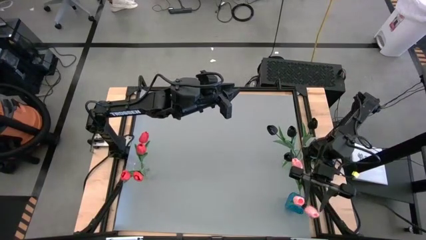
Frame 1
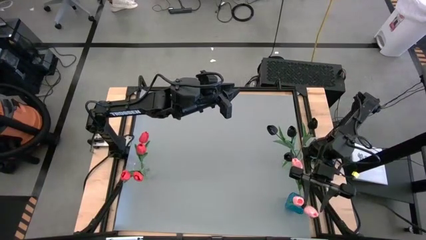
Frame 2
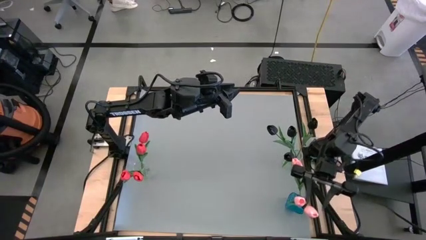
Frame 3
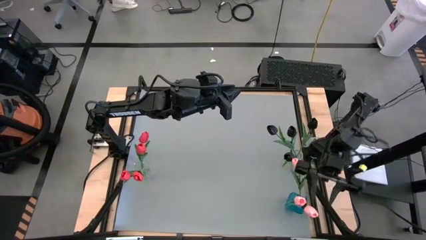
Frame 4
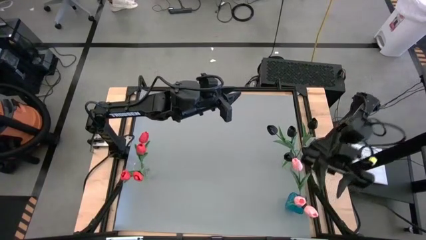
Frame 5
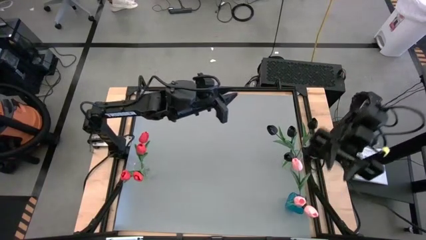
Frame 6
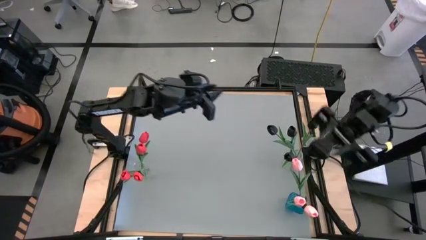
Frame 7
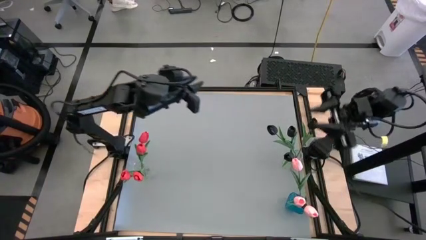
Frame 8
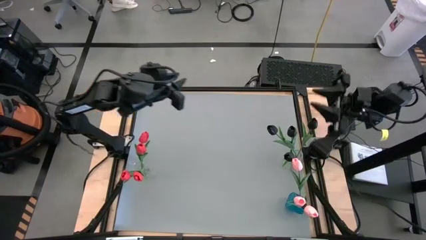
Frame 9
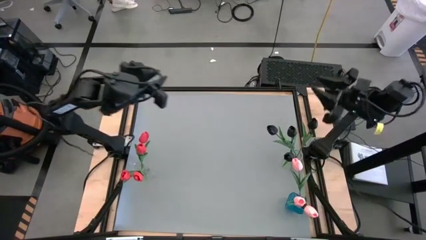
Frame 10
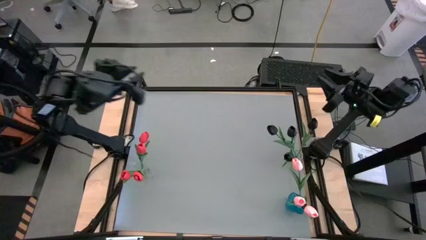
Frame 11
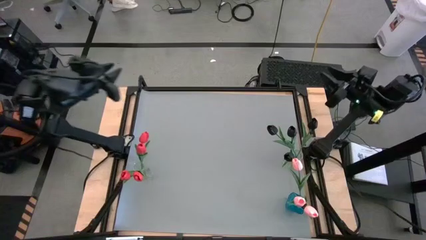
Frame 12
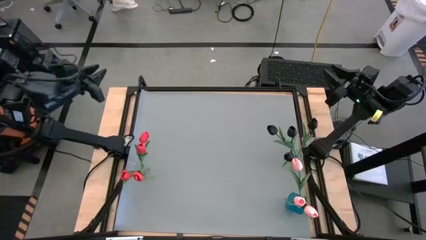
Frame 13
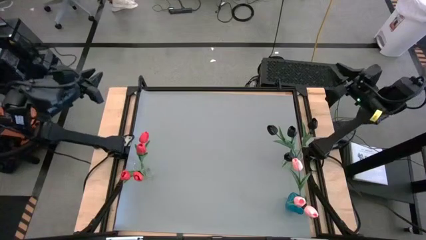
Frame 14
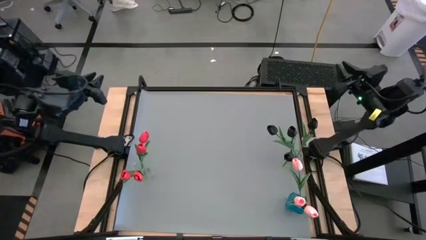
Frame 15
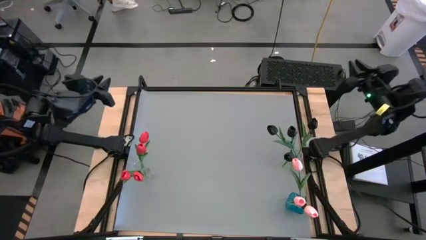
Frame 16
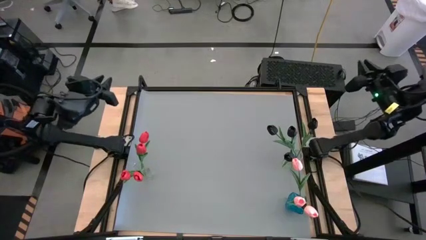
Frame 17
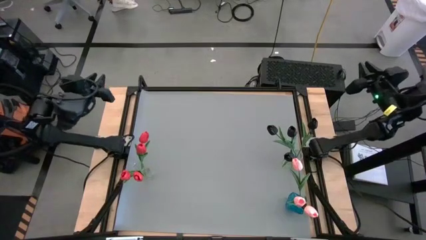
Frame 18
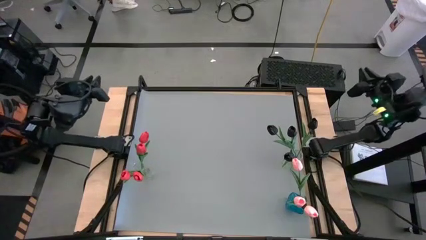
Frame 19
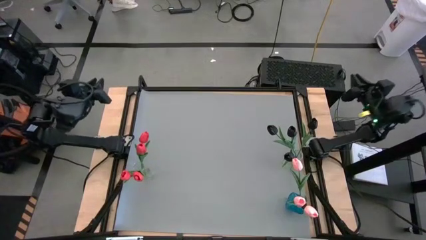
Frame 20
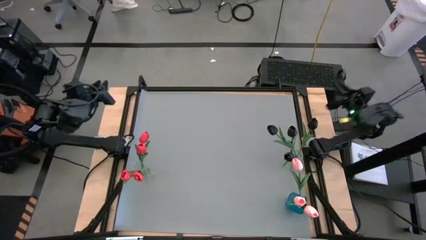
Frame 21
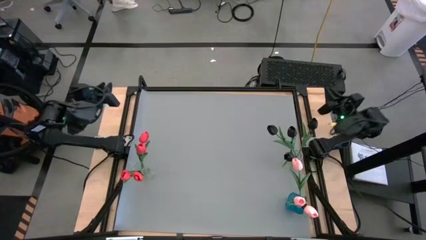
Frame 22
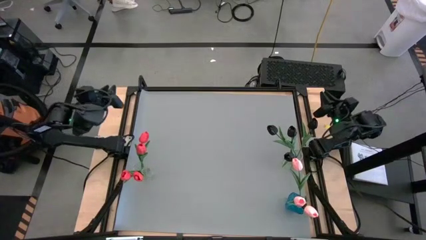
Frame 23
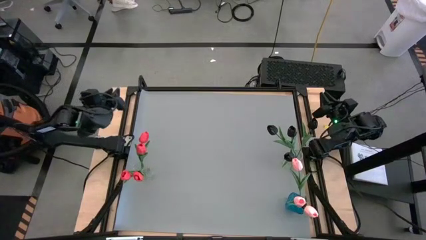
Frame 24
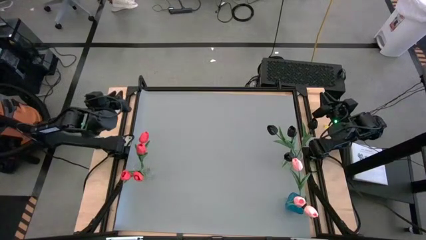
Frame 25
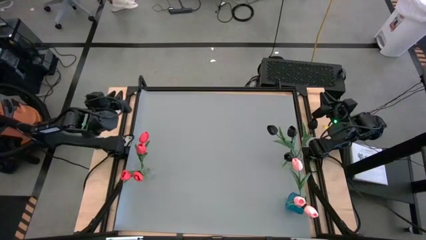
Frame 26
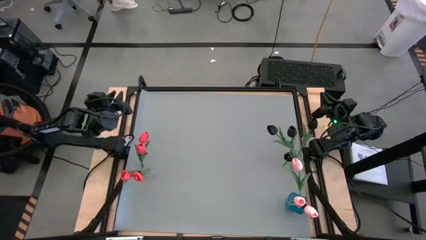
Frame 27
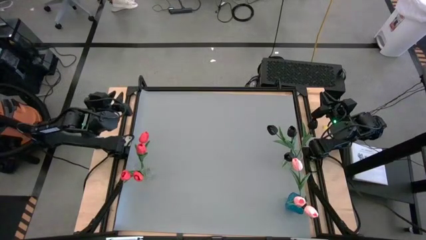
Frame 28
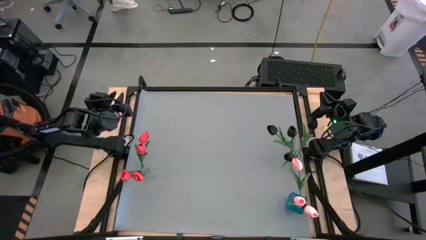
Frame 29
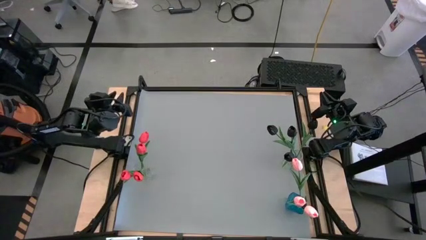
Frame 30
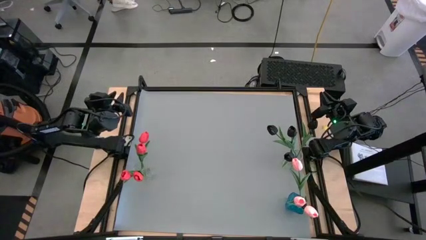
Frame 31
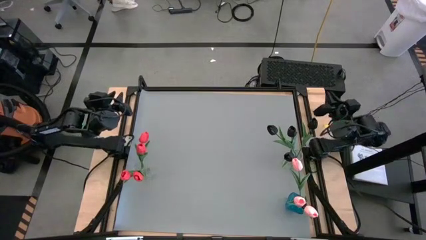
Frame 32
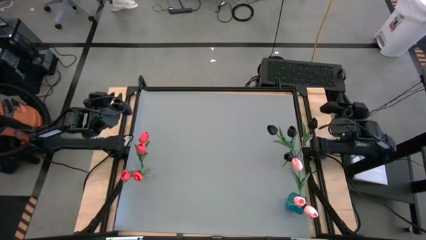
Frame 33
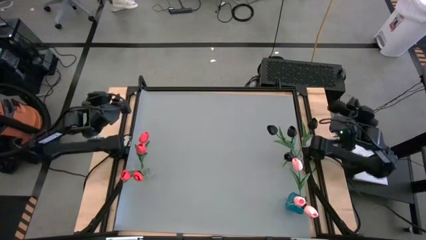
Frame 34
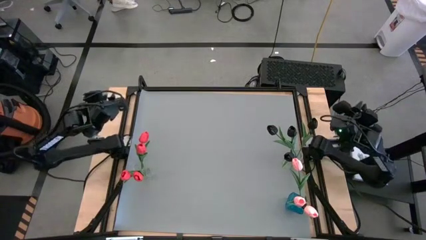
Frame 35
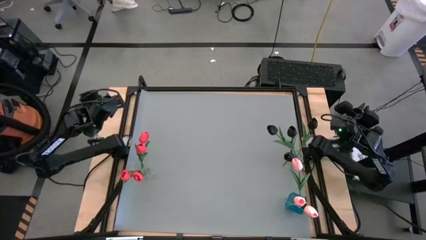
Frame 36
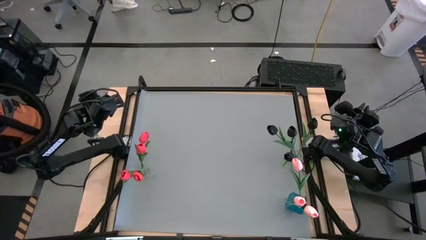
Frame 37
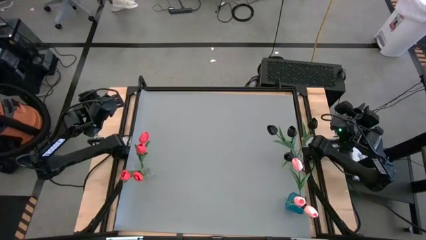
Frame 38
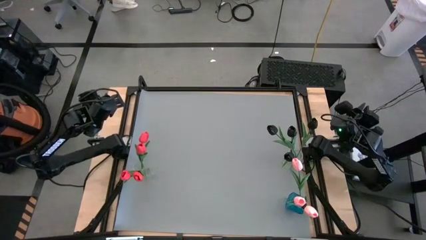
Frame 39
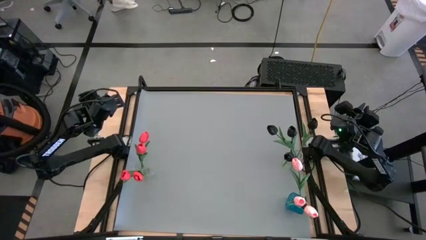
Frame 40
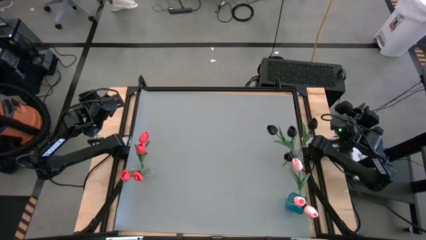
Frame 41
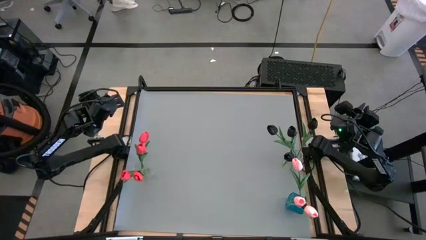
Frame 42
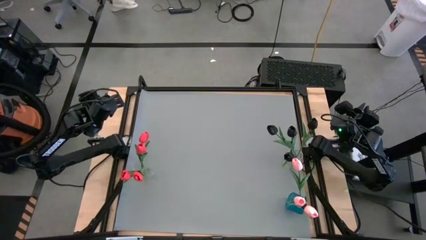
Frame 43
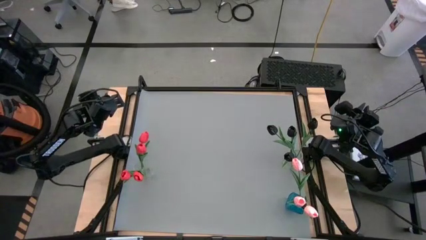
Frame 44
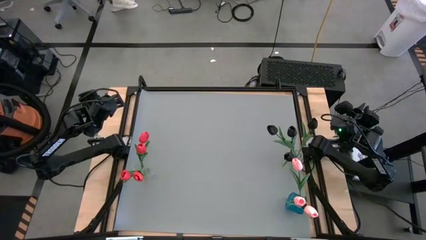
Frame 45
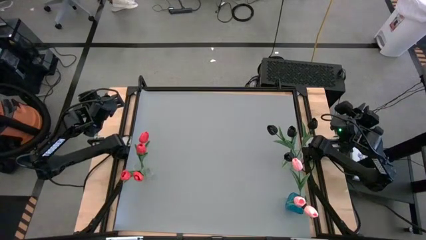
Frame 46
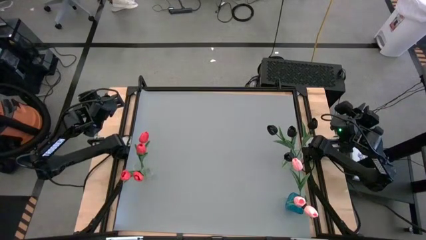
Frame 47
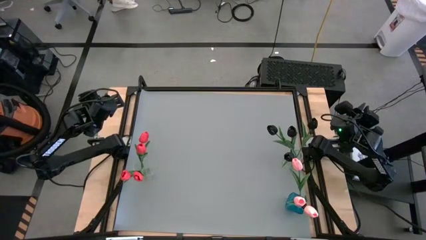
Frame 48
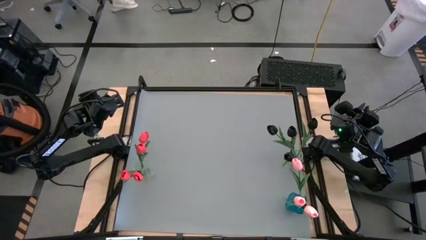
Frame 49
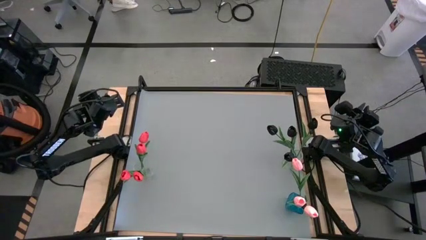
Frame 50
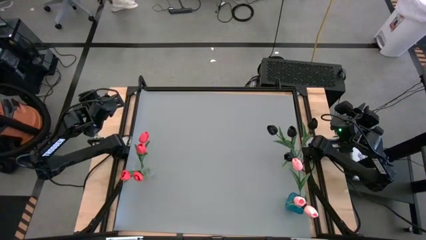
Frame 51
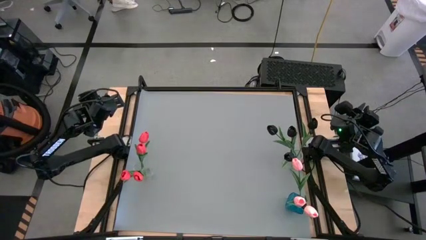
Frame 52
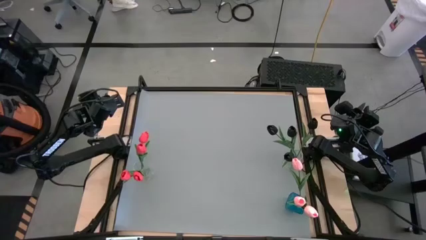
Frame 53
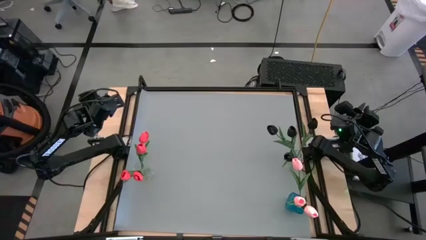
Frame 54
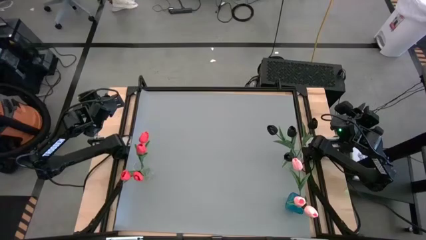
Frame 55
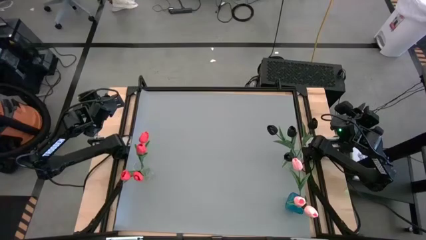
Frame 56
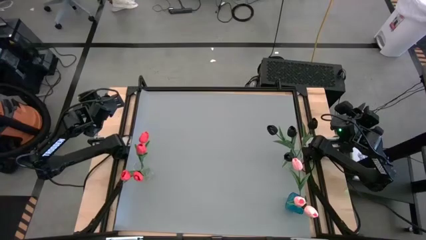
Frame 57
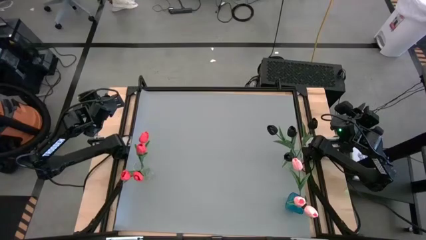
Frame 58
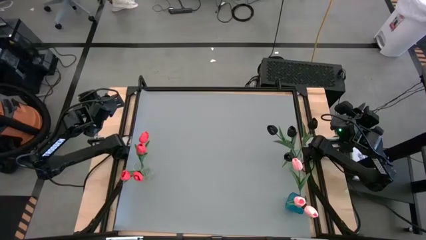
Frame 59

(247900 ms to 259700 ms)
Task: Sort flowers into vase by color
Return to Home Position
